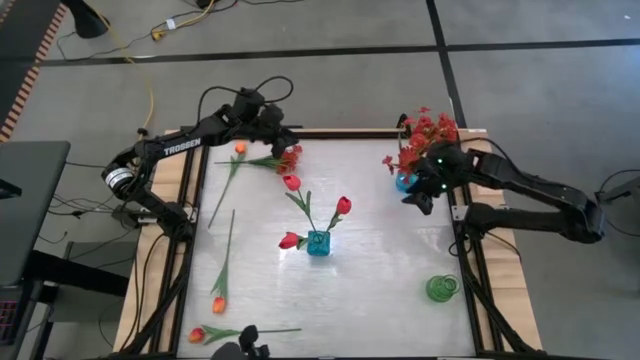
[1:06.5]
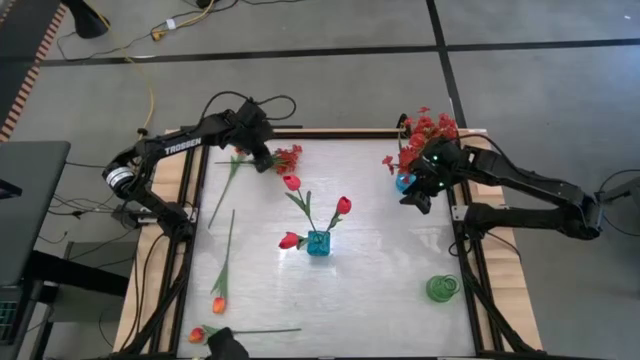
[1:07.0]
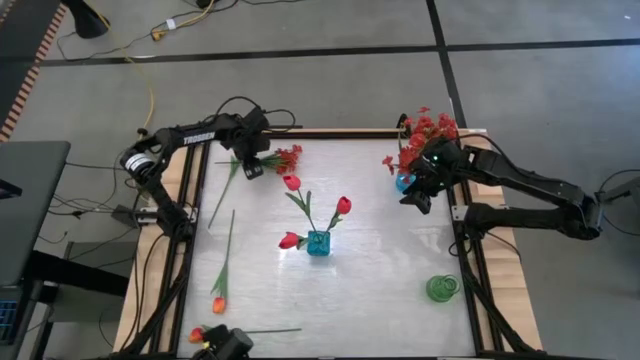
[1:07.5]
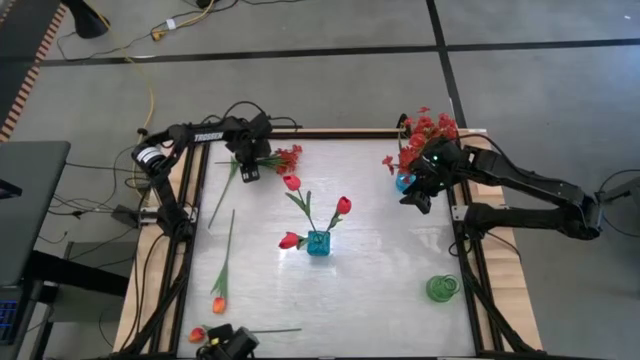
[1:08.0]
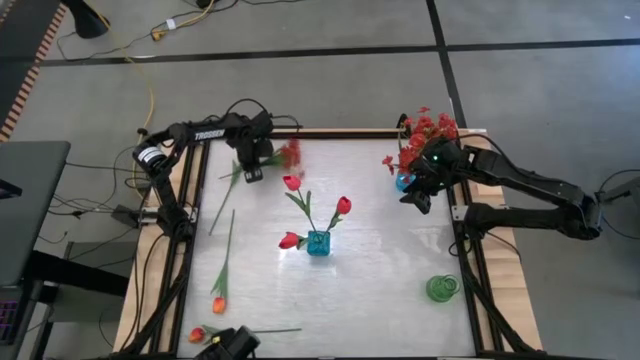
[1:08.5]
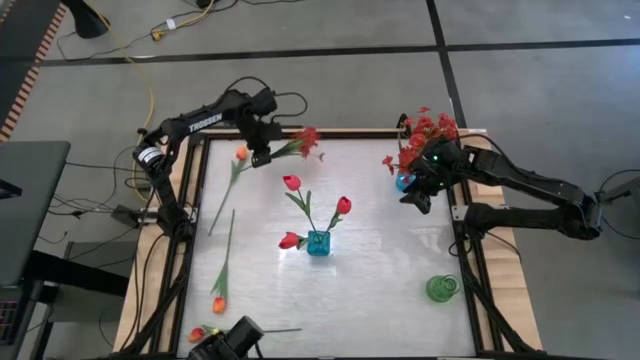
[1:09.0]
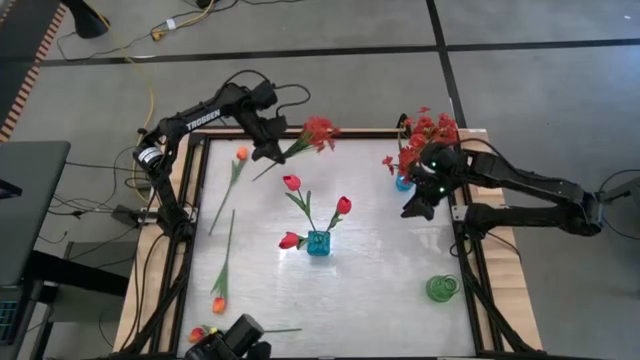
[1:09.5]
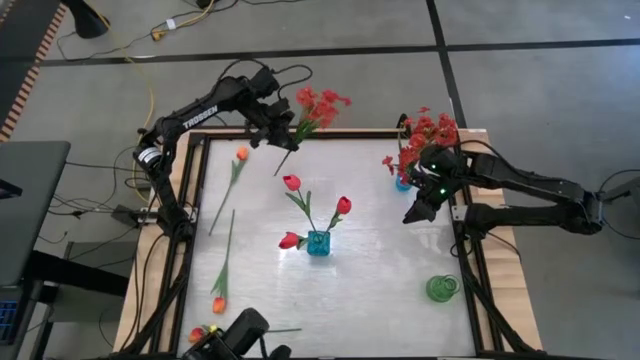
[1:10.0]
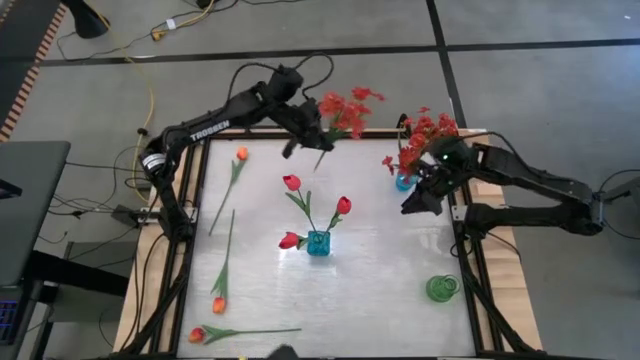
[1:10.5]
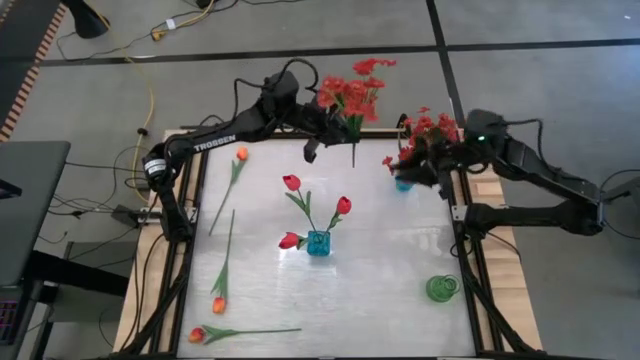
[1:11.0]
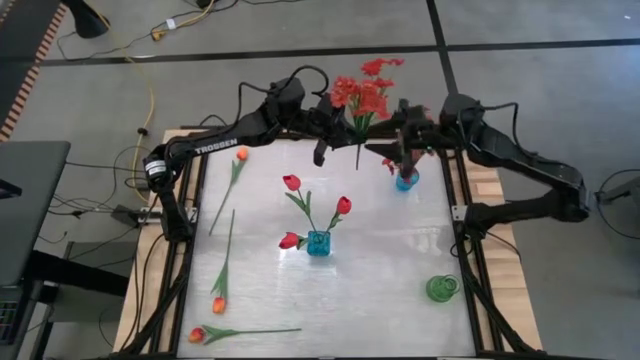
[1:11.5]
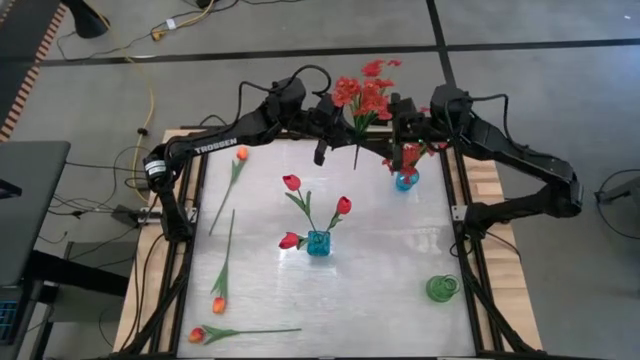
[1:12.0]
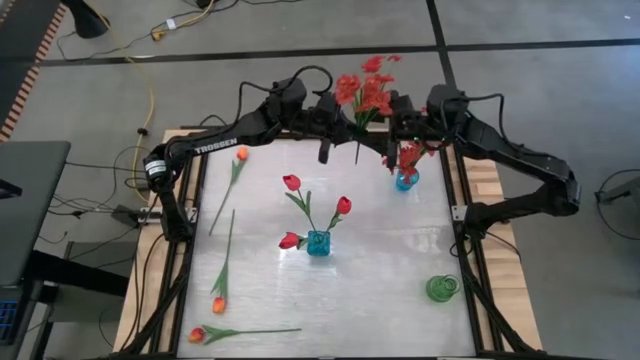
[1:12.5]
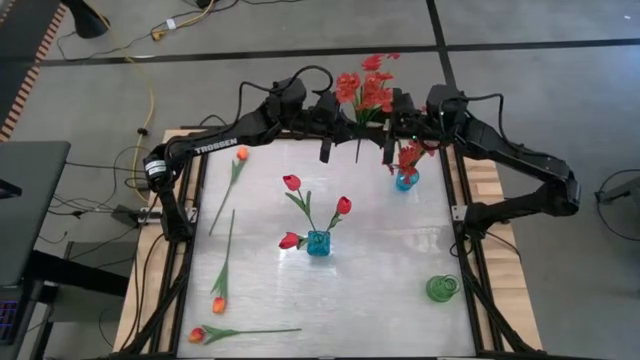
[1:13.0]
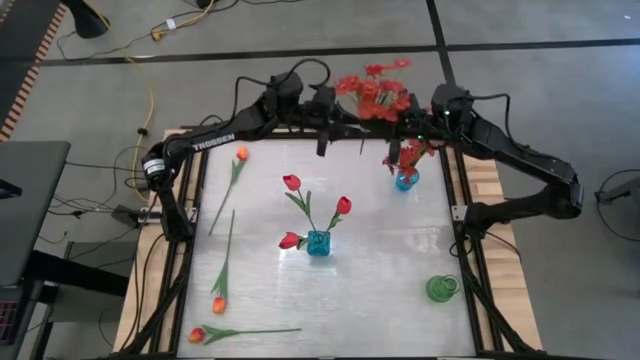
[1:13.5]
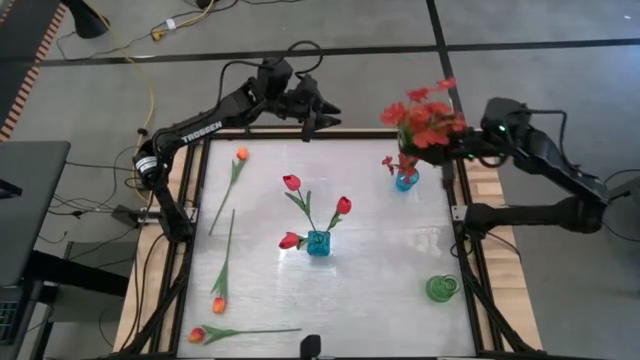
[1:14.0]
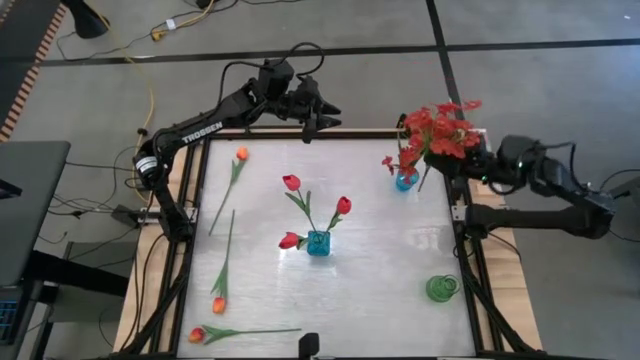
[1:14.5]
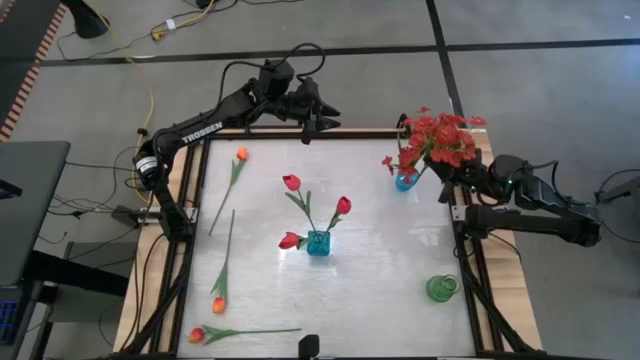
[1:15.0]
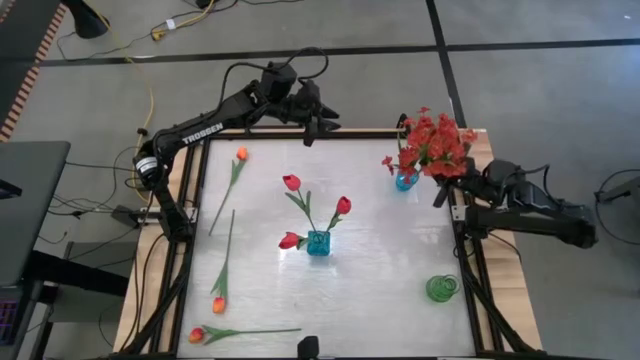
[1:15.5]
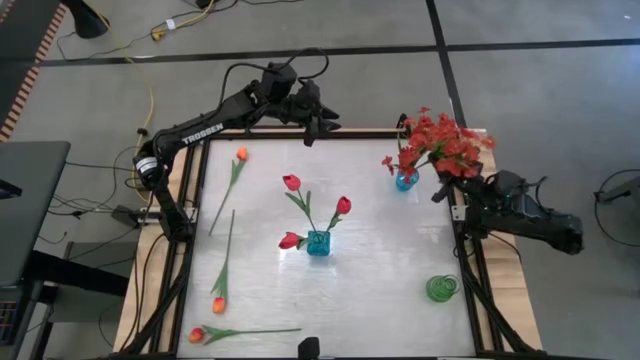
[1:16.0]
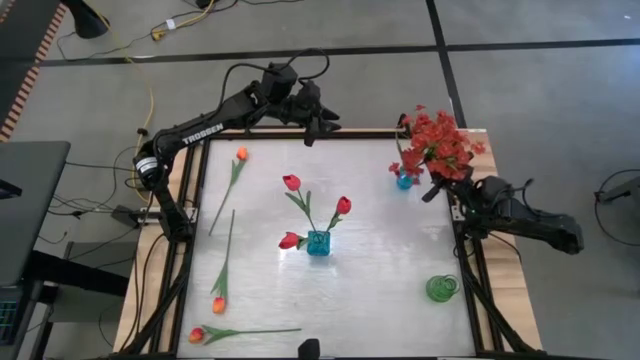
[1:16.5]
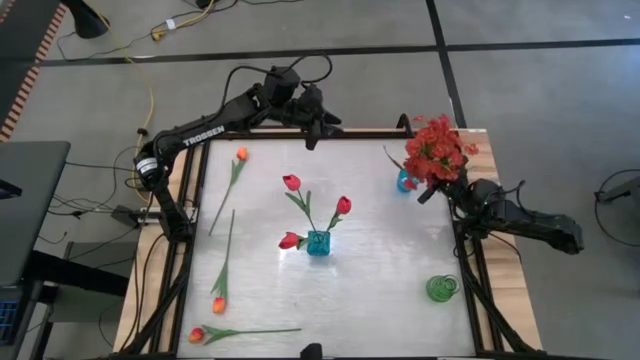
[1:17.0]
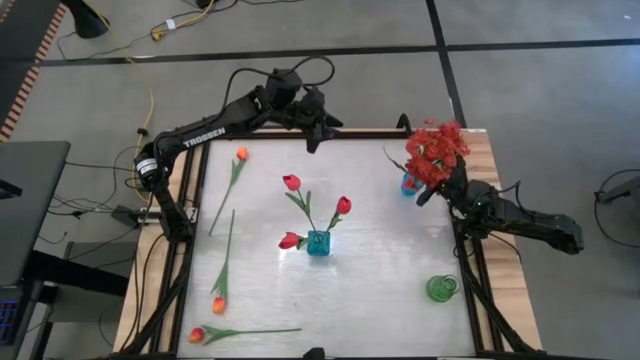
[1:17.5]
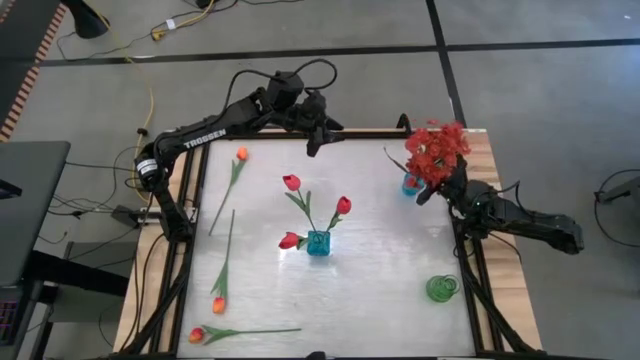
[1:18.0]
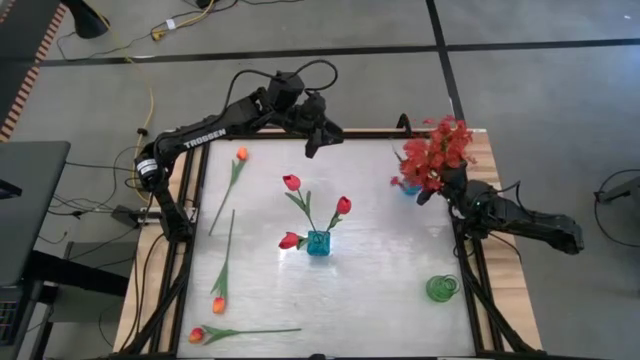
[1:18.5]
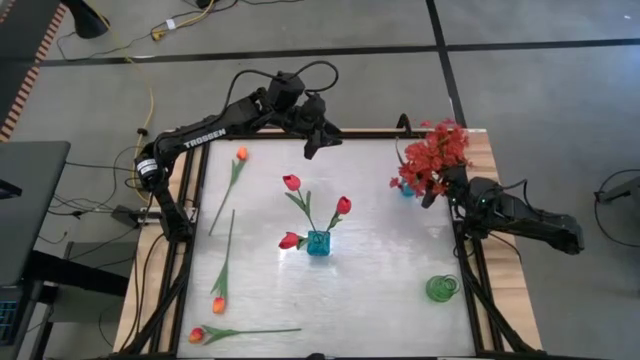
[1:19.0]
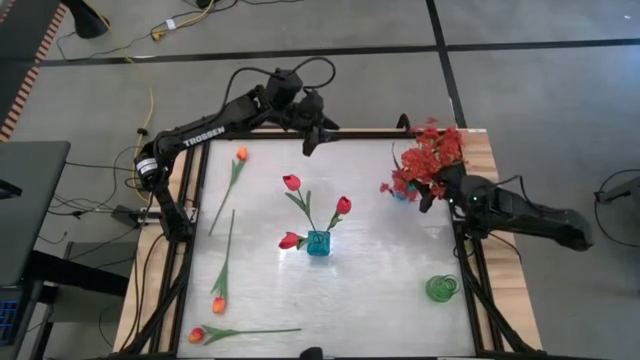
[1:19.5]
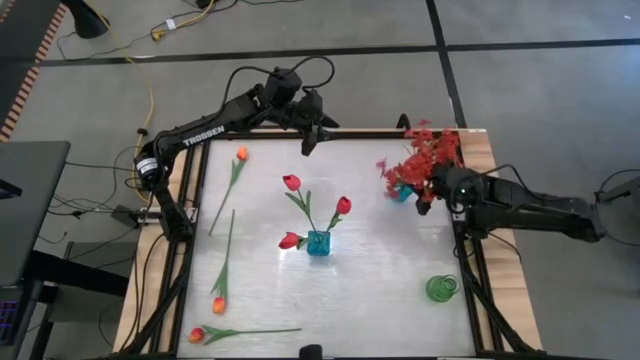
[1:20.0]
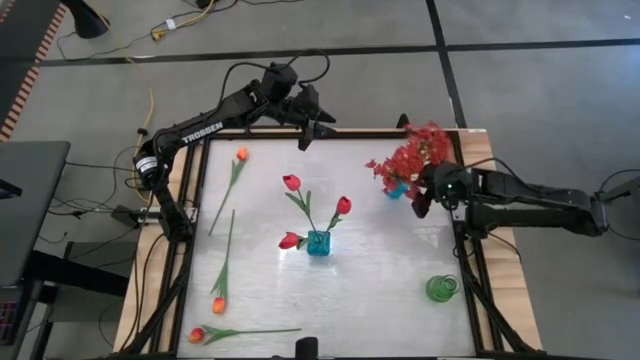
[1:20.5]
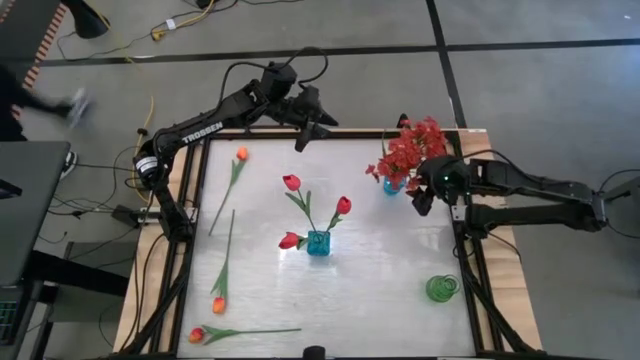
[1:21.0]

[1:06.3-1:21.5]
Task: Sort flowers into vase by color
Put the orange flower into the top blue vase

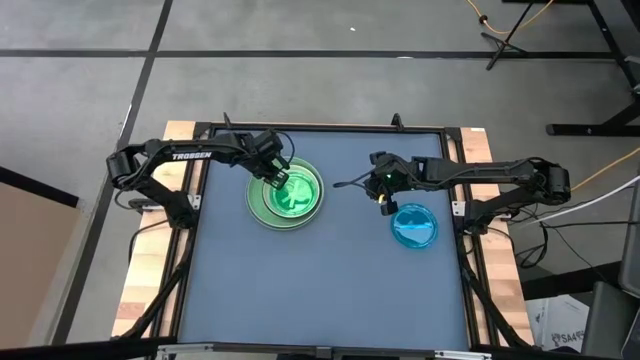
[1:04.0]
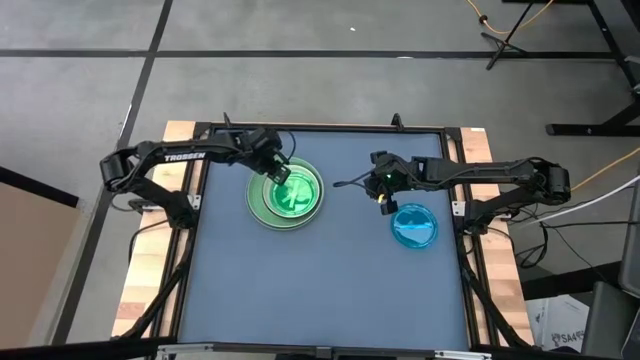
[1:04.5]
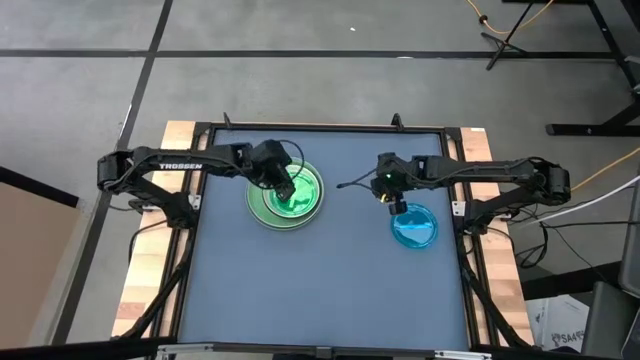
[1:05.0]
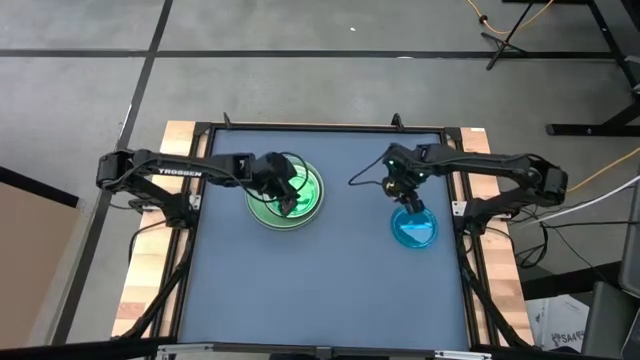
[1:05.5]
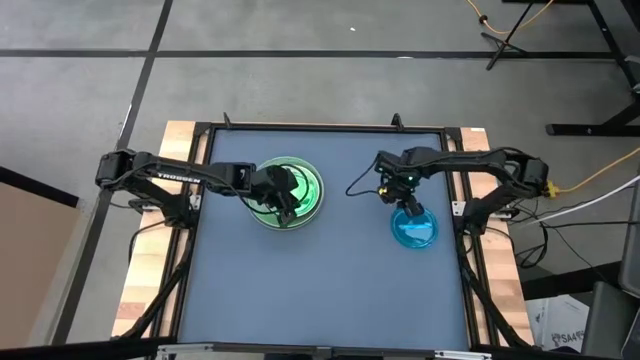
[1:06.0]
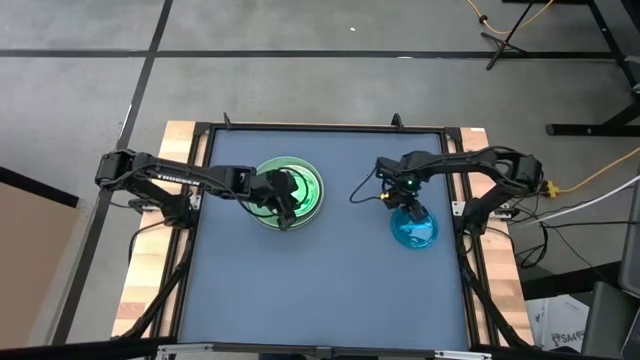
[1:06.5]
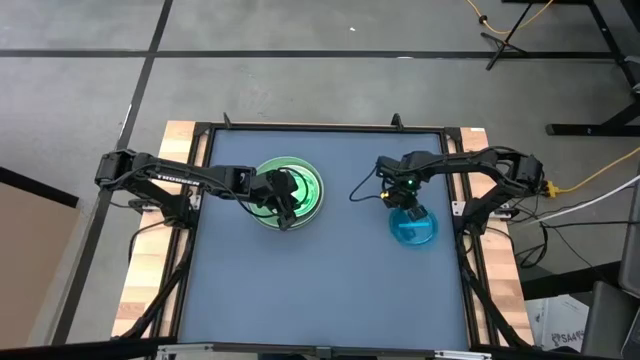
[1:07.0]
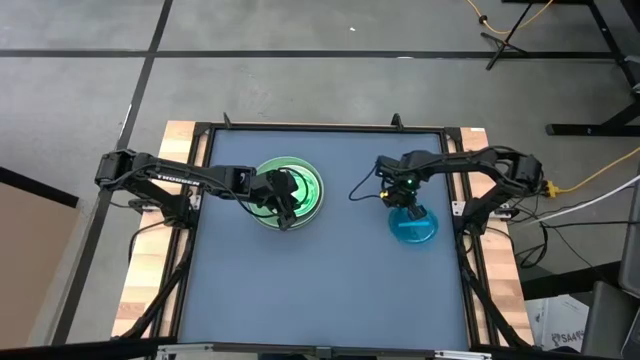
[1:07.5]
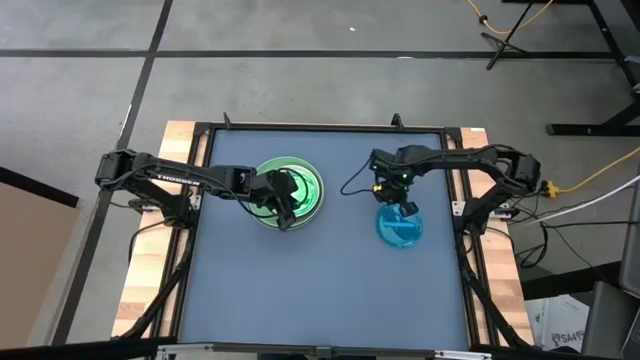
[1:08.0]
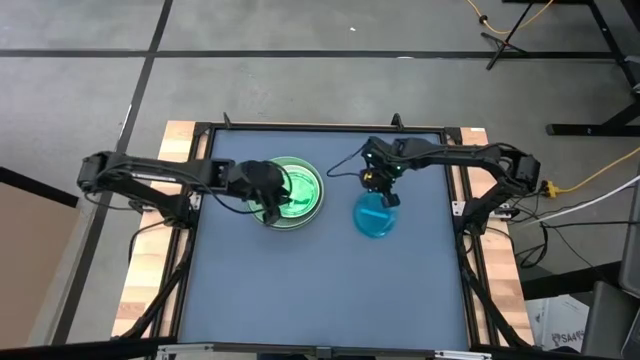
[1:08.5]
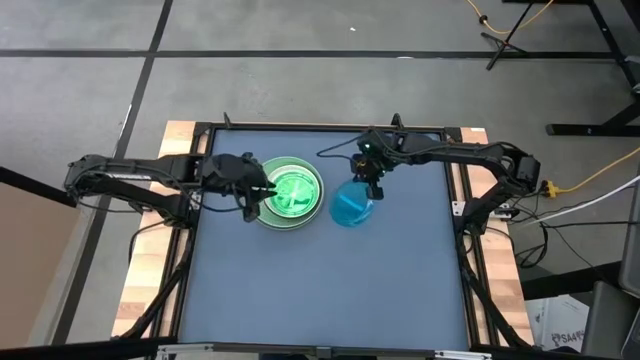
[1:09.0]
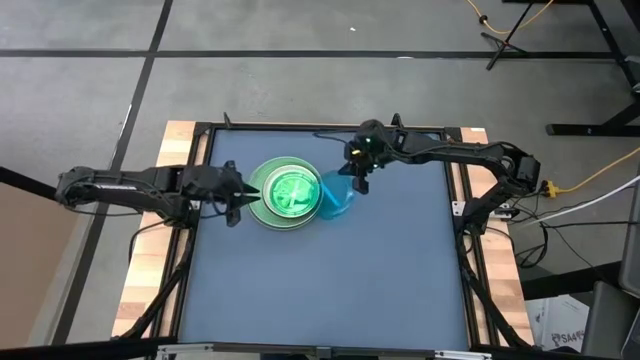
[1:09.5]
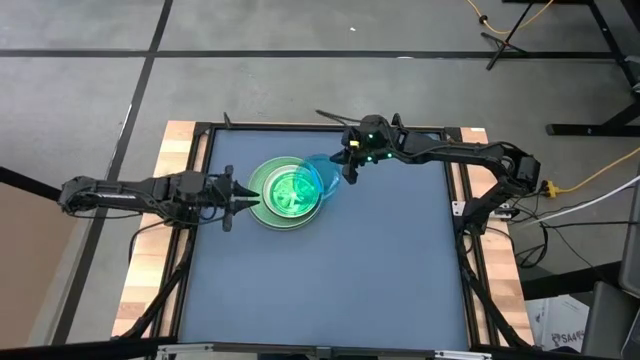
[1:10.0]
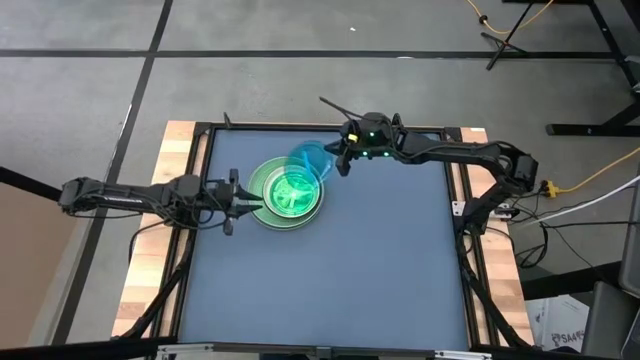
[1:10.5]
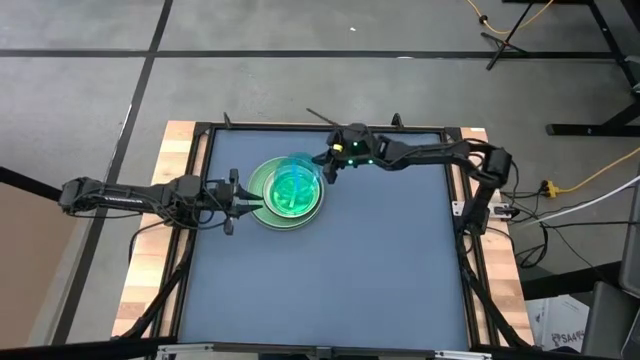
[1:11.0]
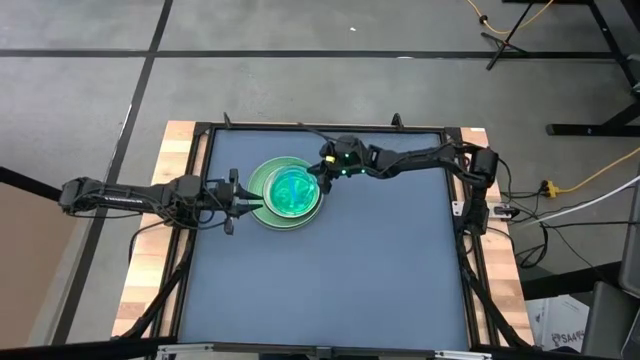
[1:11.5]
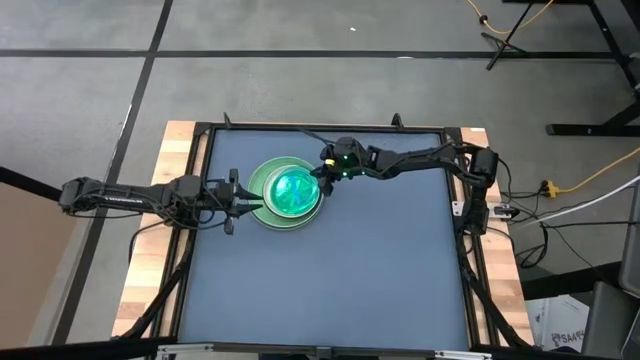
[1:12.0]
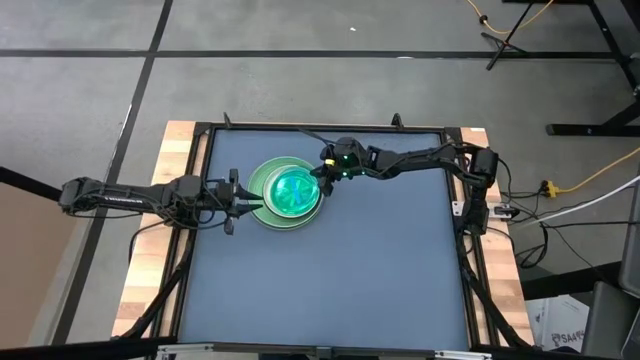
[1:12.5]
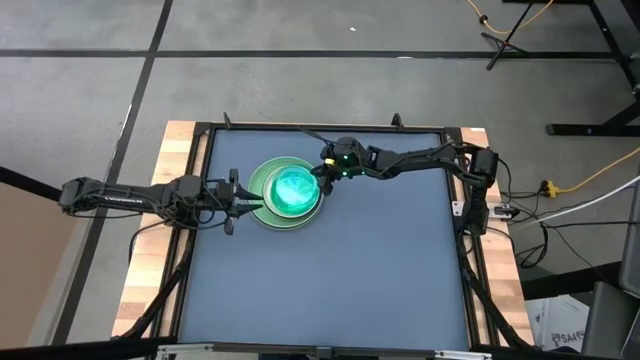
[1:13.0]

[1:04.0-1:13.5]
Task: Stack plastic plates
Stack the transparent blue plate on top of the transparent green plate
